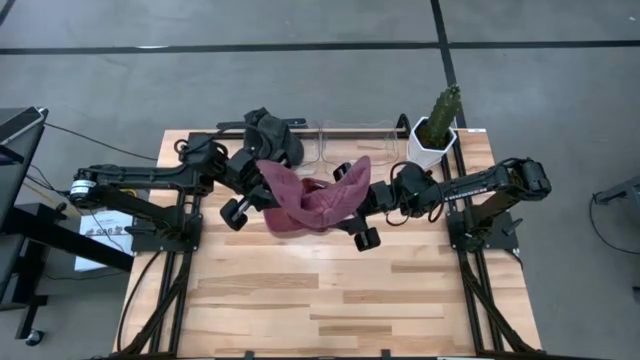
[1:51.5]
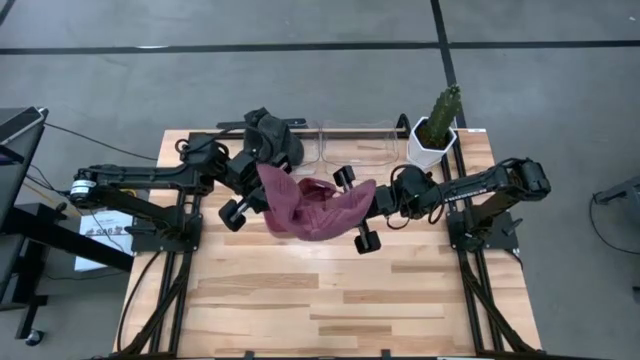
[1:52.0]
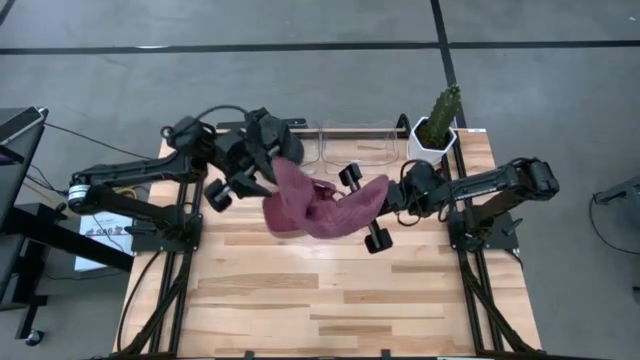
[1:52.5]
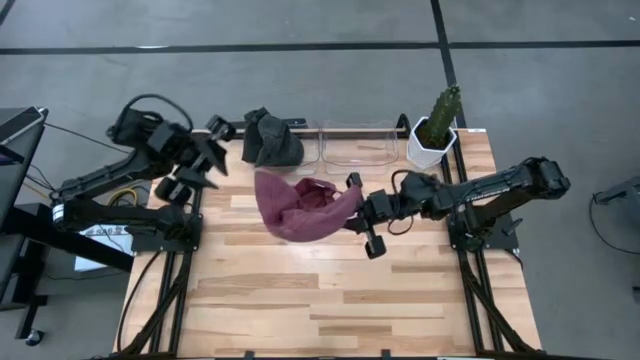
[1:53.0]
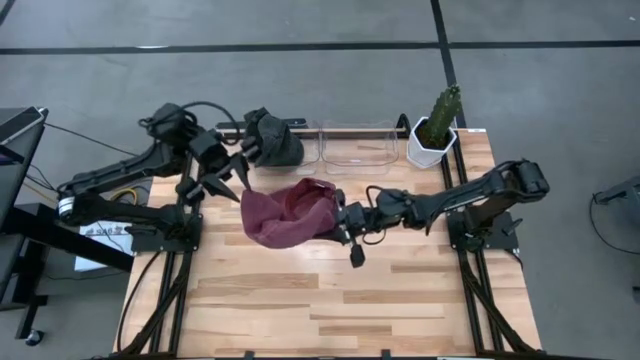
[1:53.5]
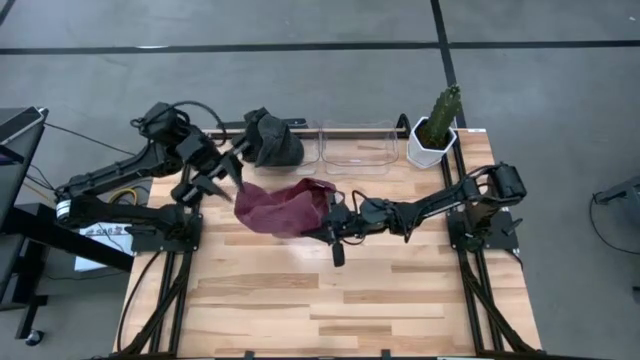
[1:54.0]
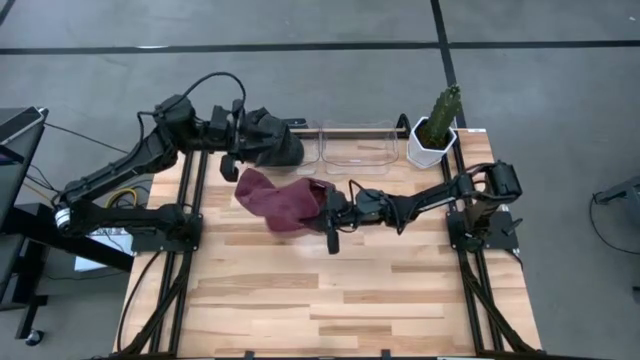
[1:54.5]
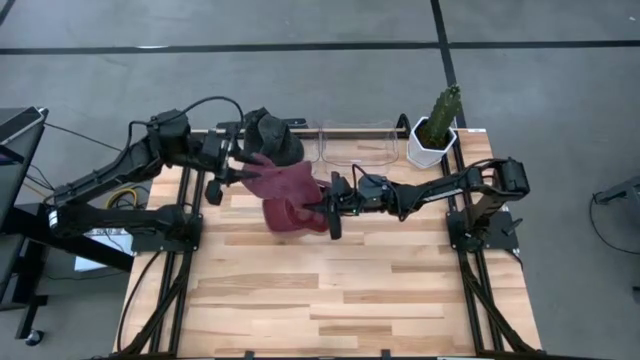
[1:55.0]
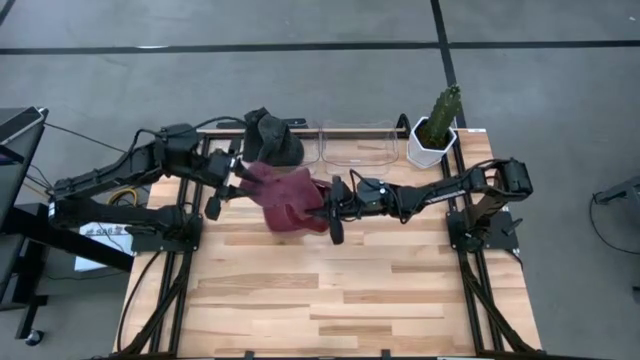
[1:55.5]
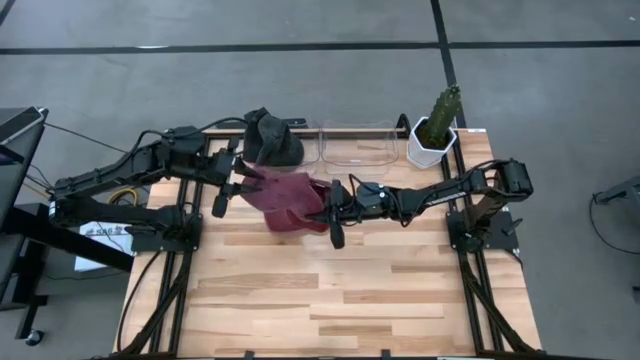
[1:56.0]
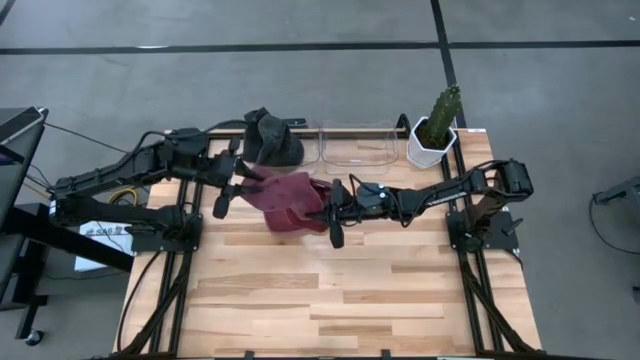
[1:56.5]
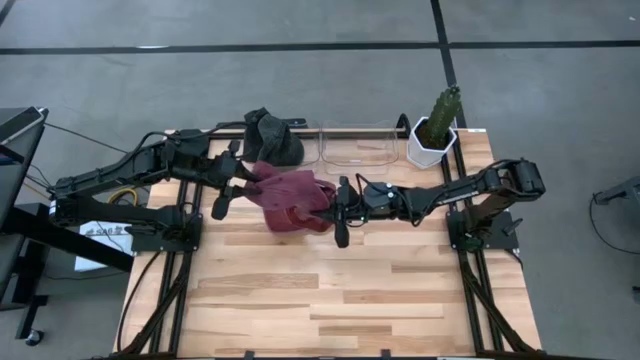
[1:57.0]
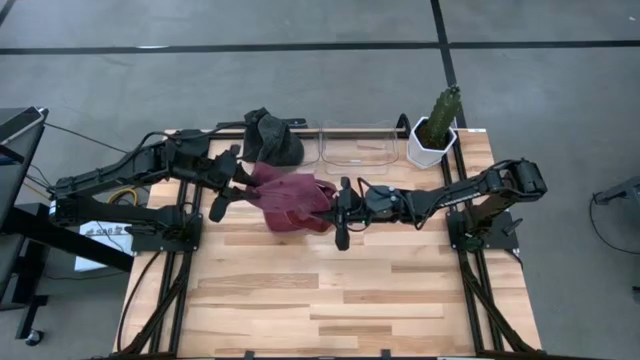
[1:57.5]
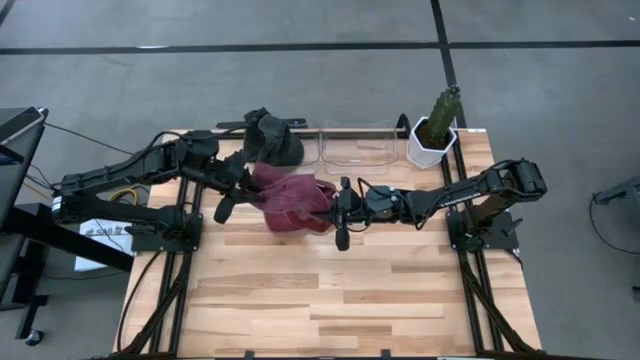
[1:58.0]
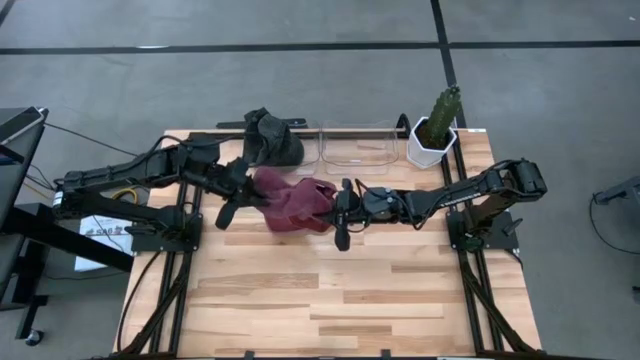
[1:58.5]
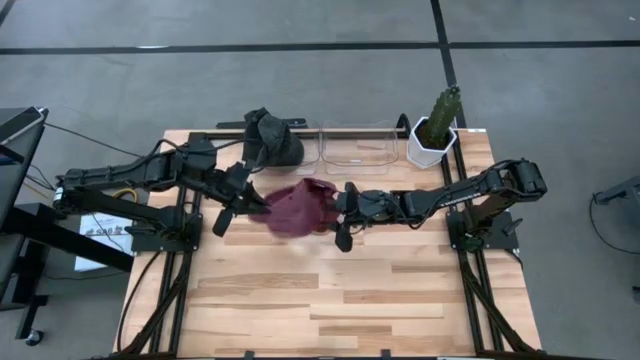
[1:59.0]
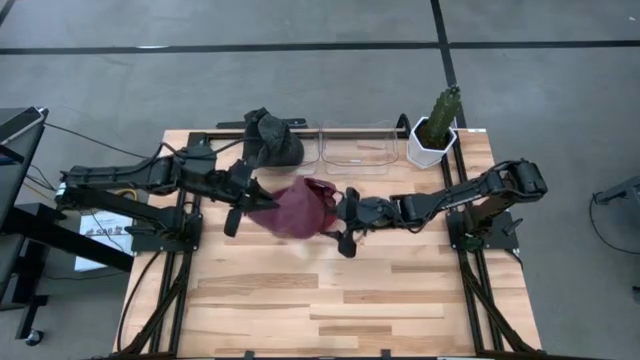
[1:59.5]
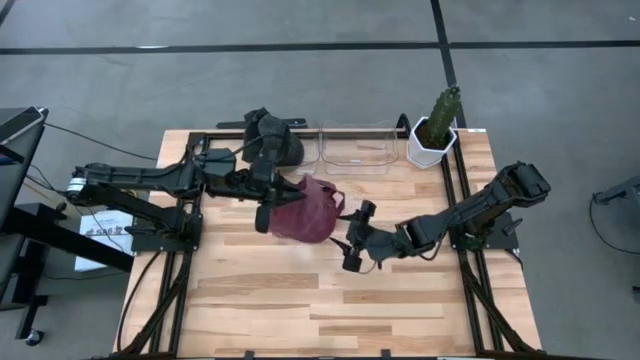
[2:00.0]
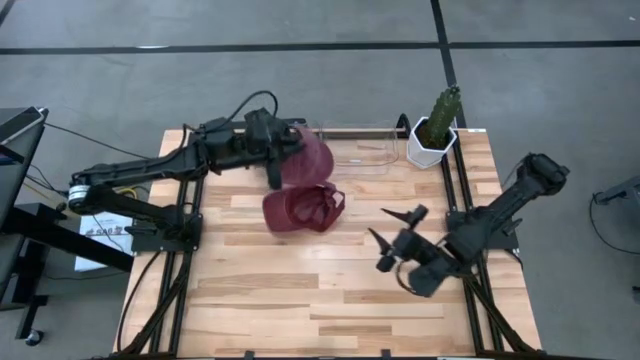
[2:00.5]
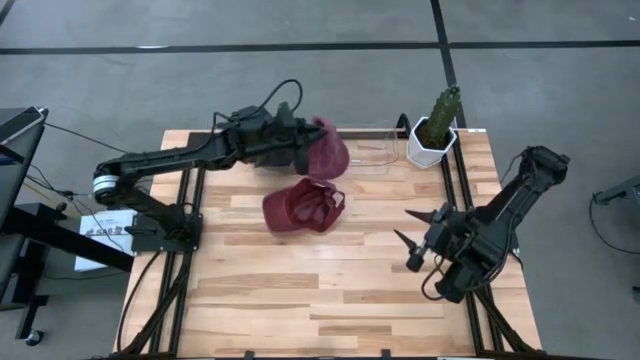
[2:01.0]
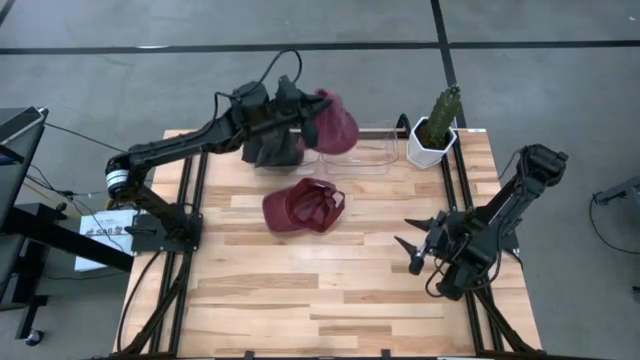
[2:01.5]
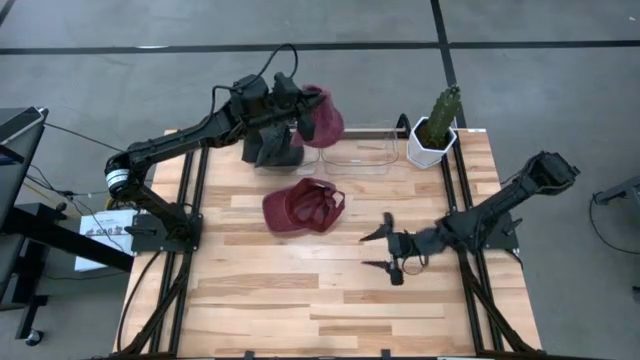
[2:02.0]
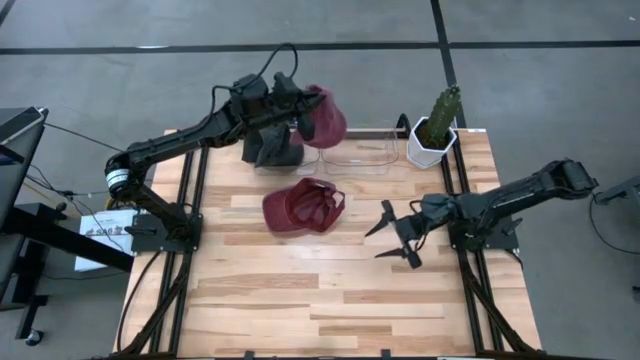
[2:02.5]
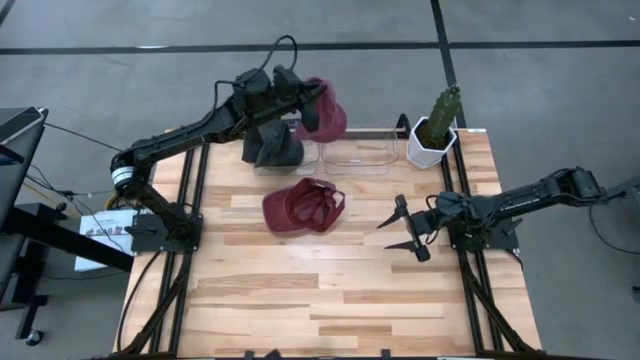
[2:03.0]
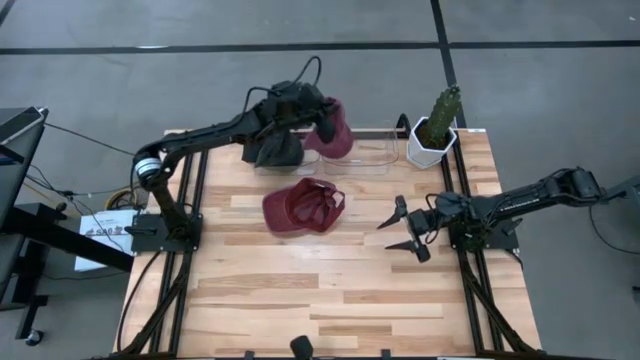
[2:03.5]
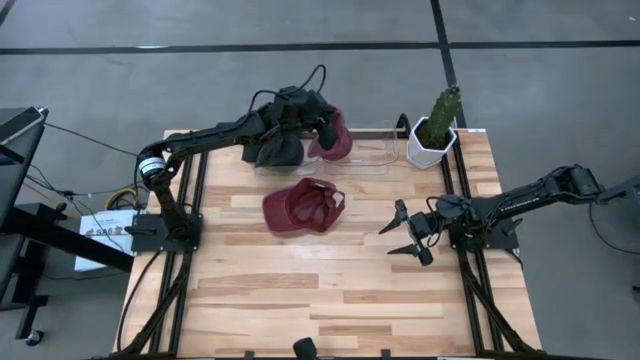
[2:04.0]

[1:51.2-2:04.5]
Task: Pick & Place hat
Put the right red cap into the right transparent bin

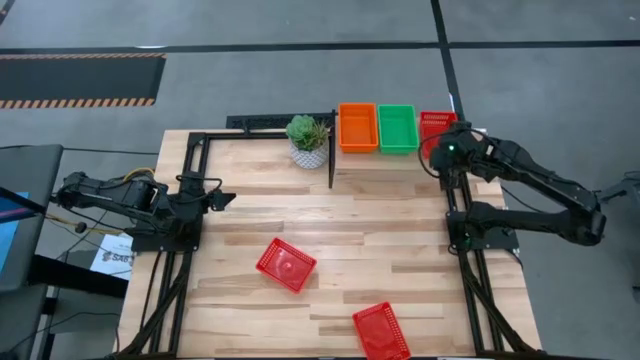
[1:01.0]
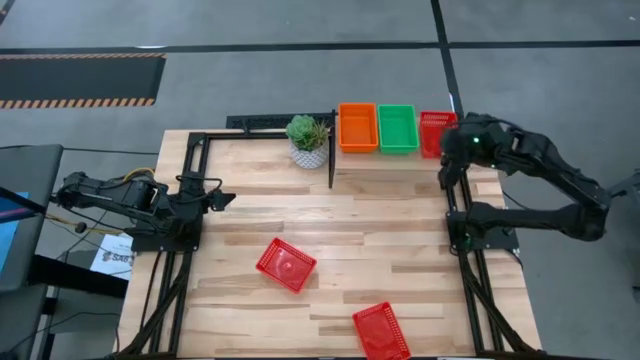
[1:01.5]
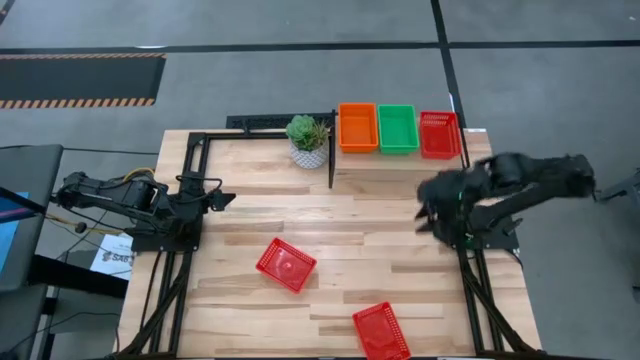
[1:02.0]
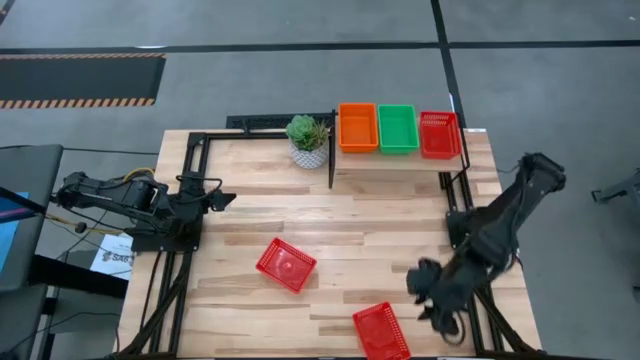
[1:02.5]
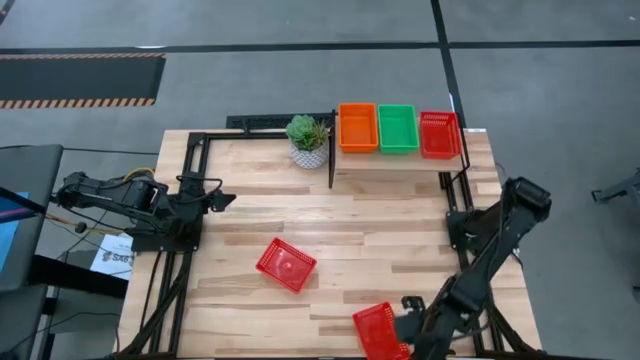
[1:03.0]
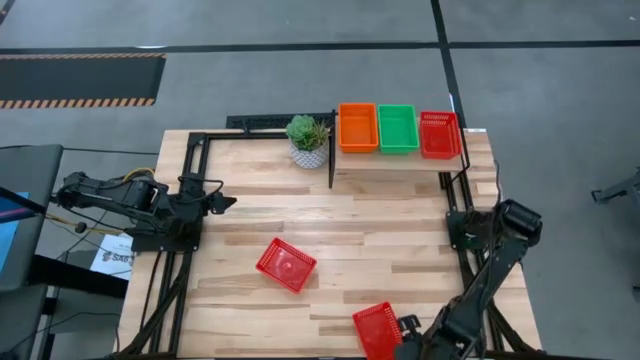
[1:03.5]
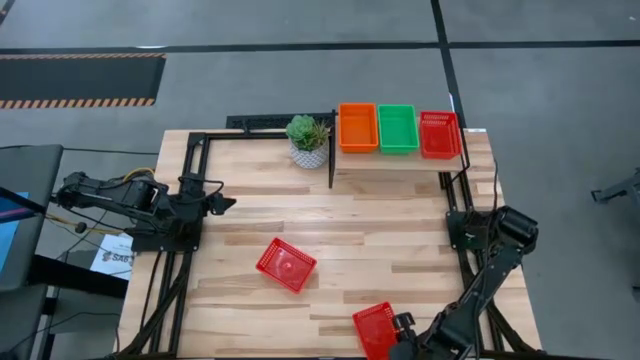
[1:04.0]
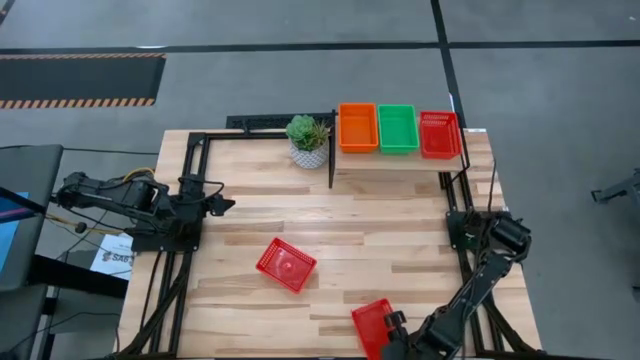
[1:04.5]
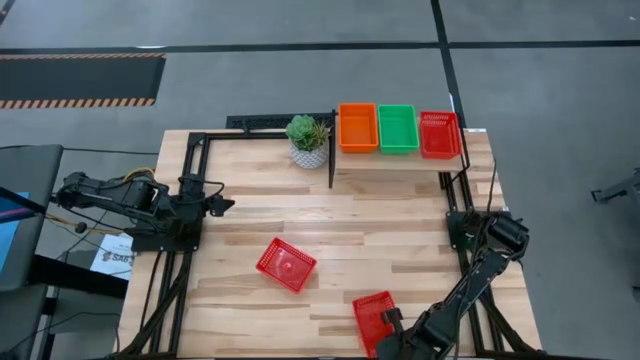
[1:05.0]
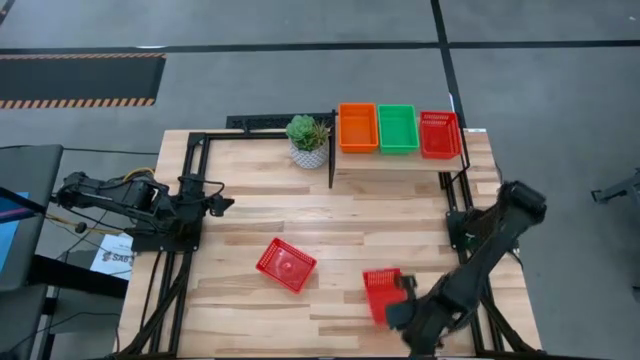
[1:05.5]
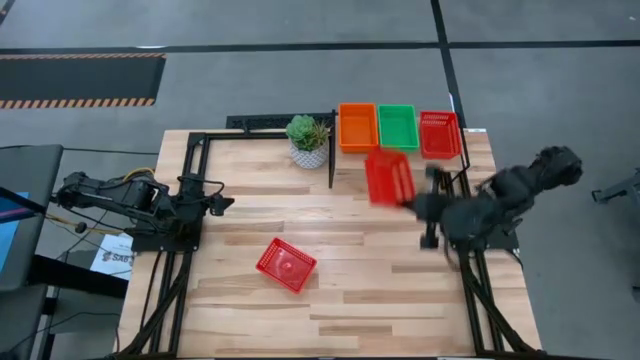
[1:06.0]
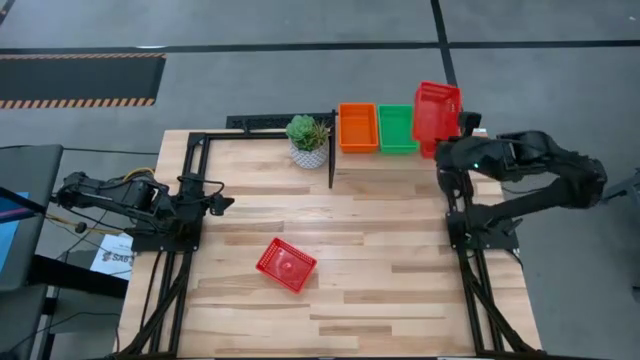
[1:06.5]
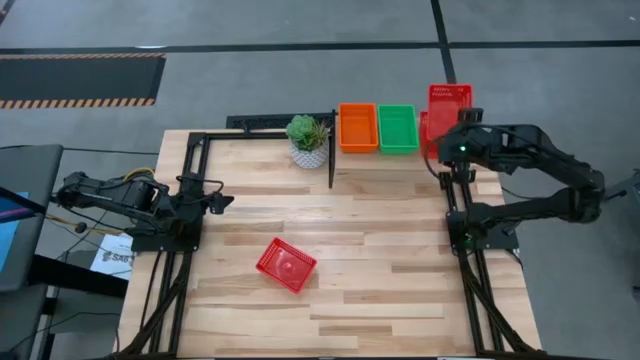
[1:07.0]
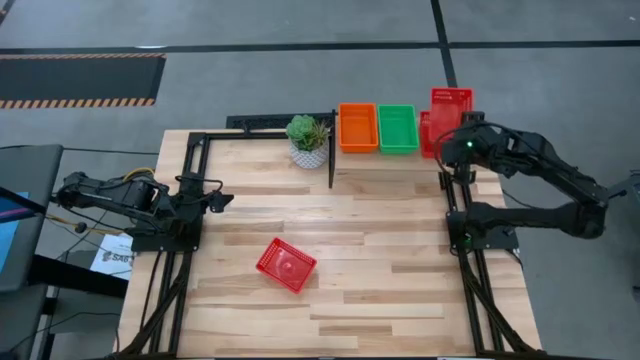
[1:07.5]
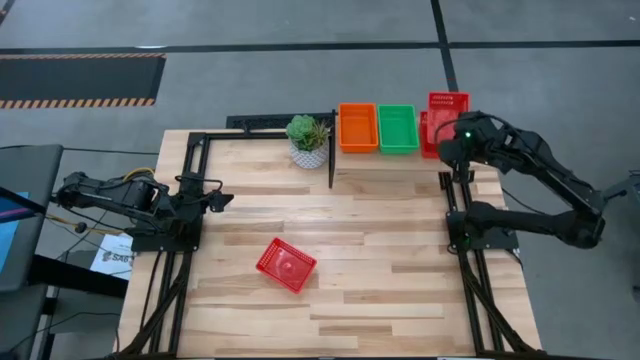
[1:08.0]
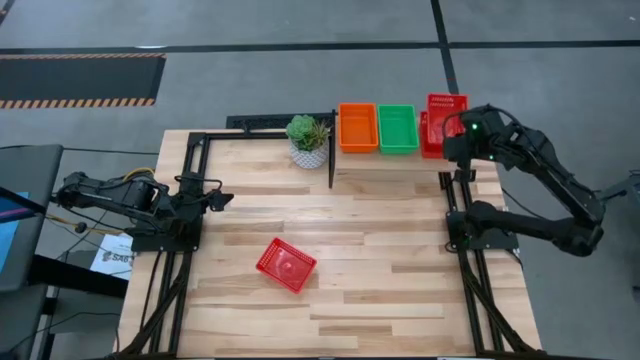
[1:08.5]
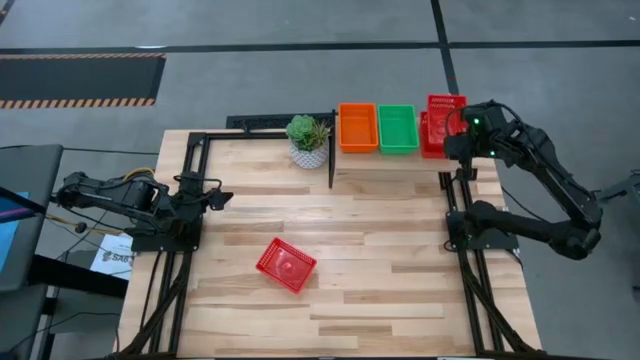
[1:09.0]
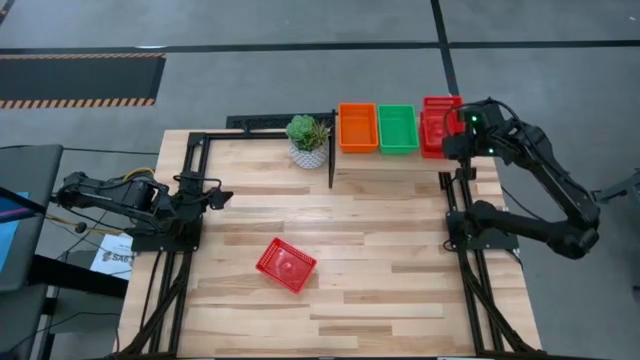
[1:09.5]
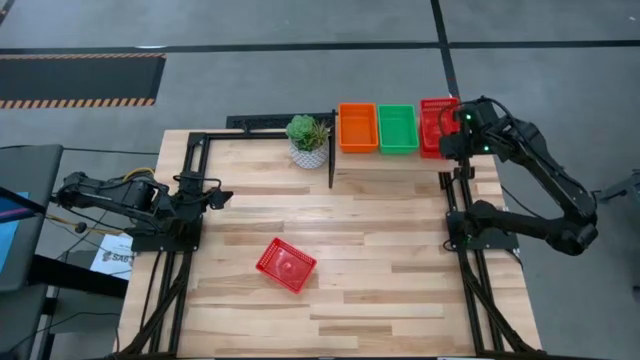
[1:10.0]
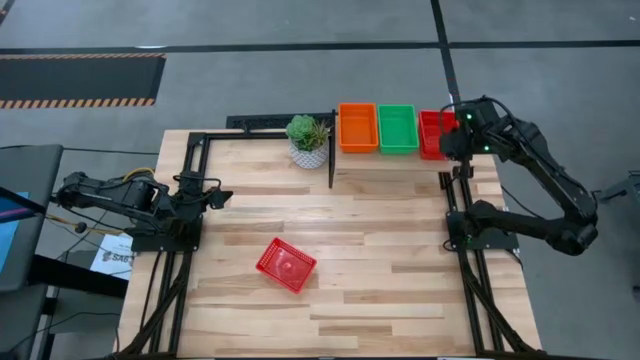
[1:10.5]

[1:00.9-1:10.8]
Task: Stack baskets on shelf by color
Stack the bottom red bin on the red bin on the shelf
